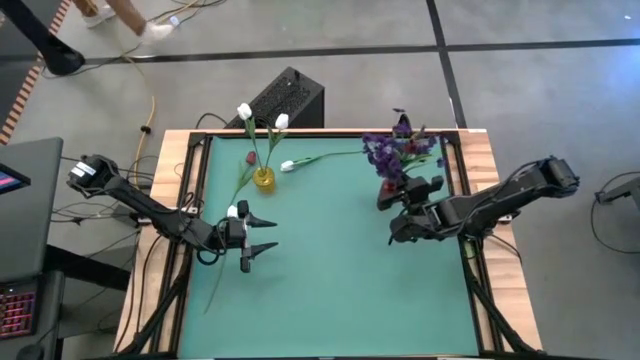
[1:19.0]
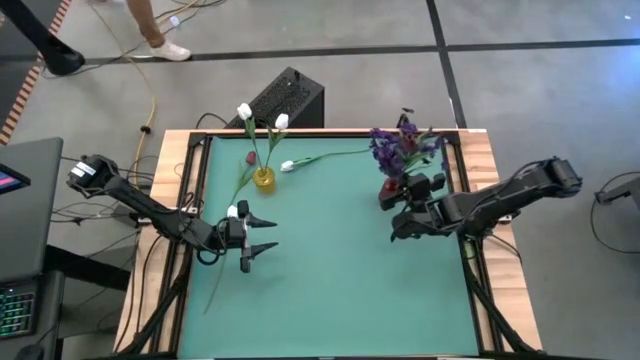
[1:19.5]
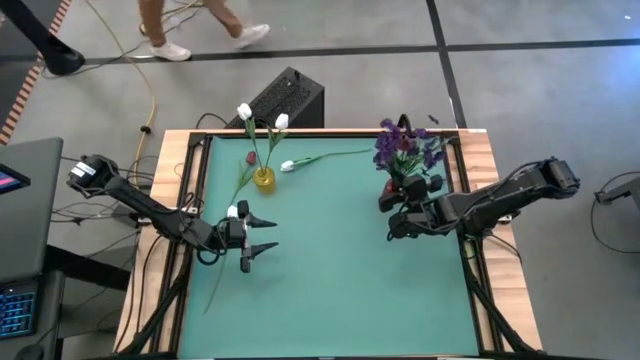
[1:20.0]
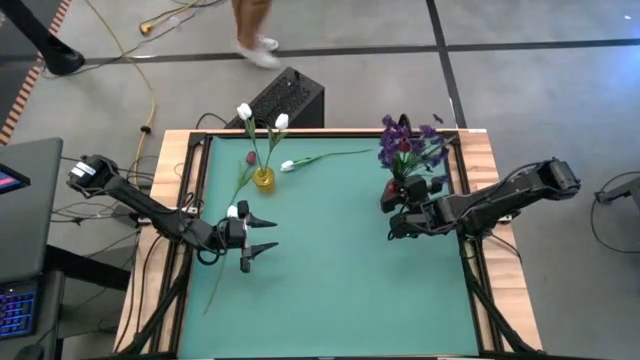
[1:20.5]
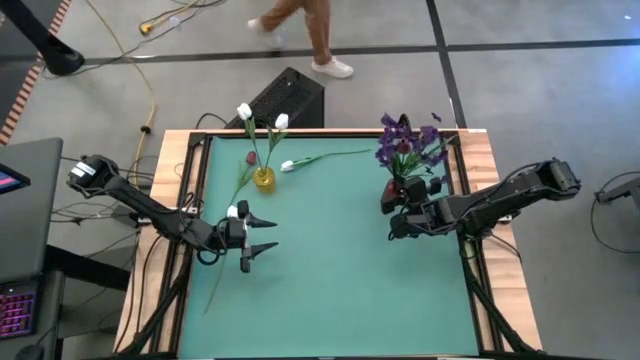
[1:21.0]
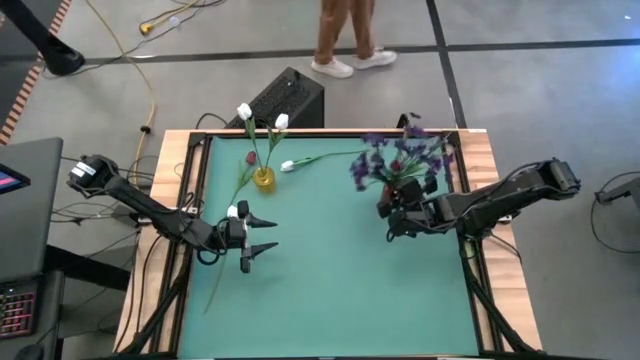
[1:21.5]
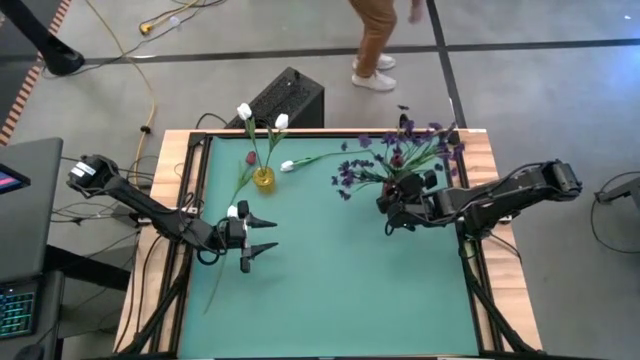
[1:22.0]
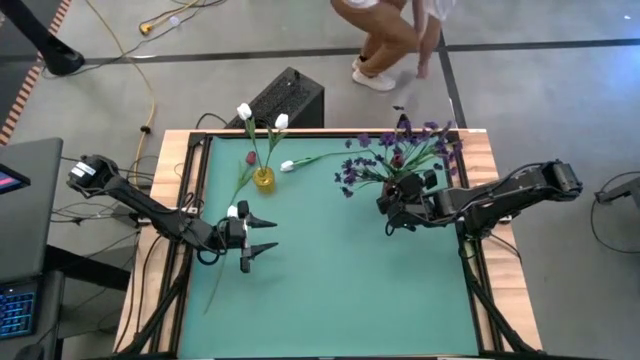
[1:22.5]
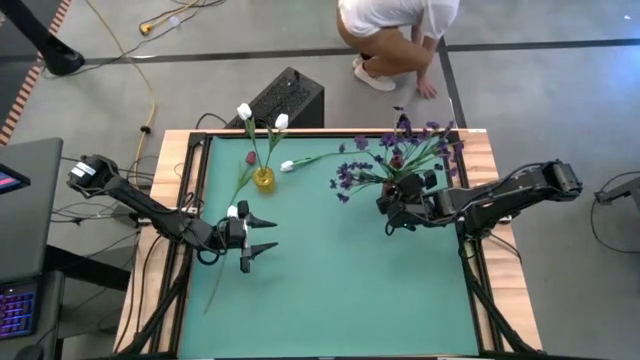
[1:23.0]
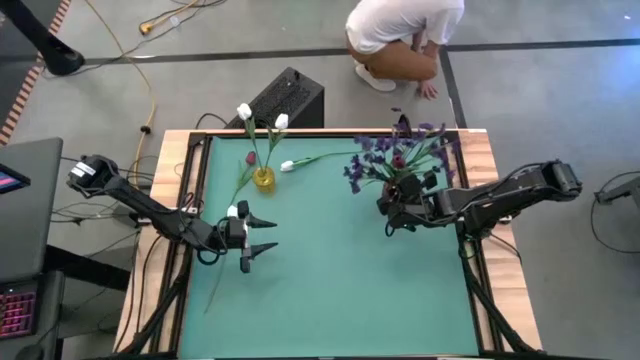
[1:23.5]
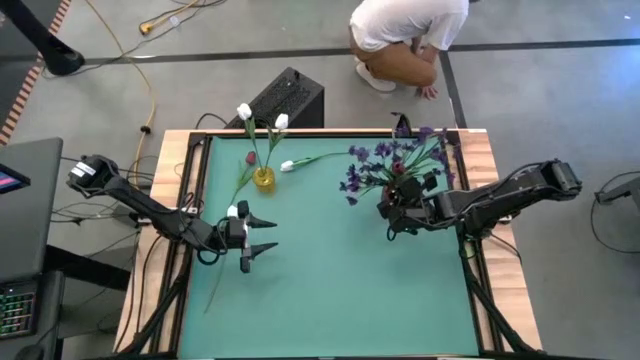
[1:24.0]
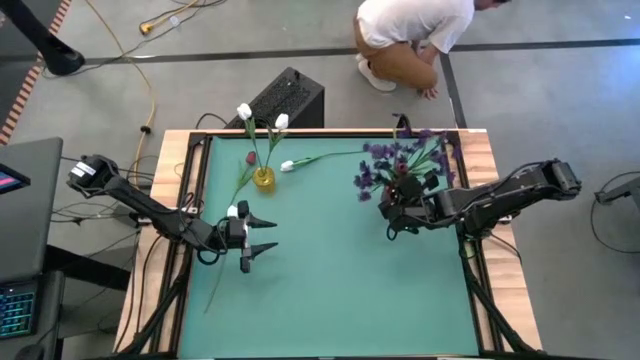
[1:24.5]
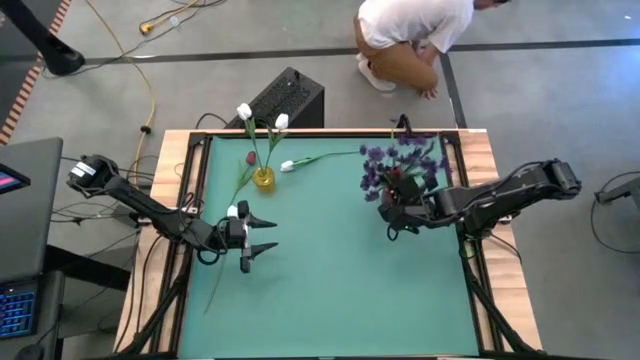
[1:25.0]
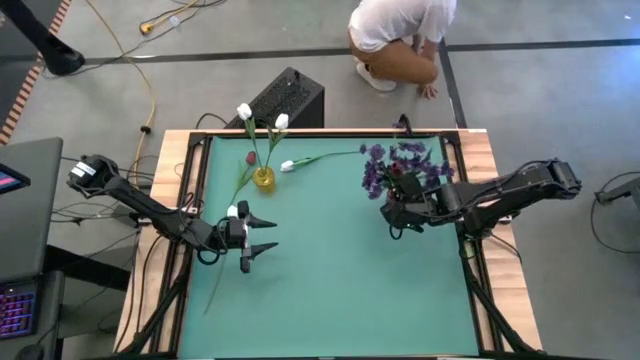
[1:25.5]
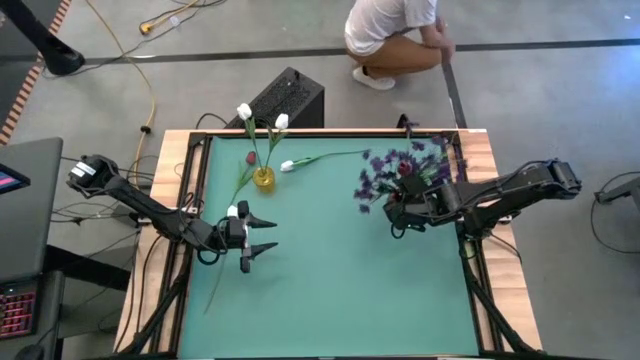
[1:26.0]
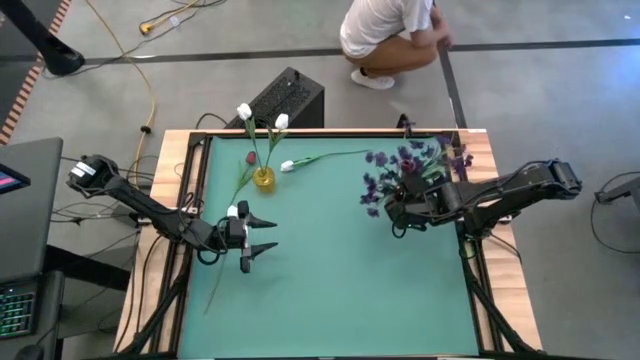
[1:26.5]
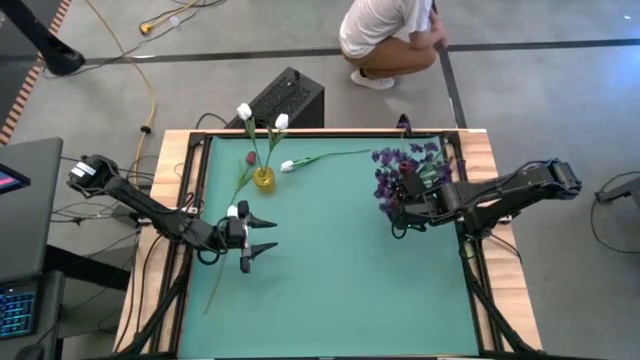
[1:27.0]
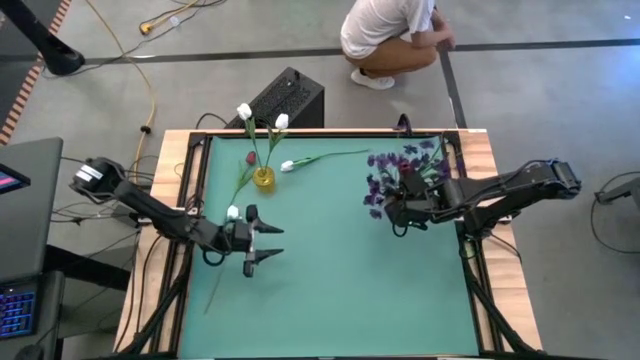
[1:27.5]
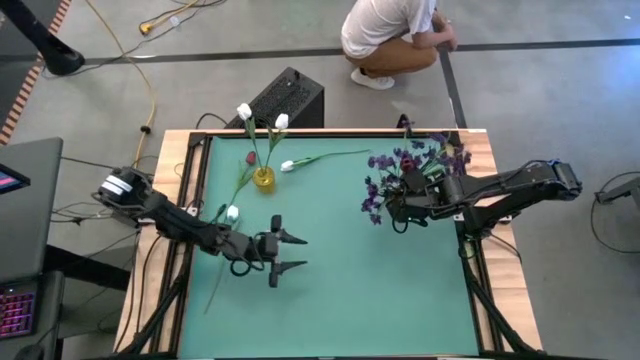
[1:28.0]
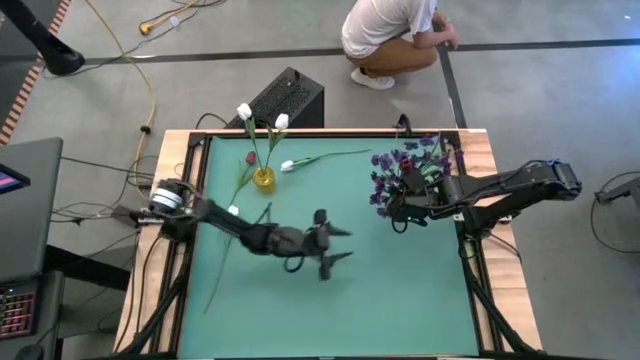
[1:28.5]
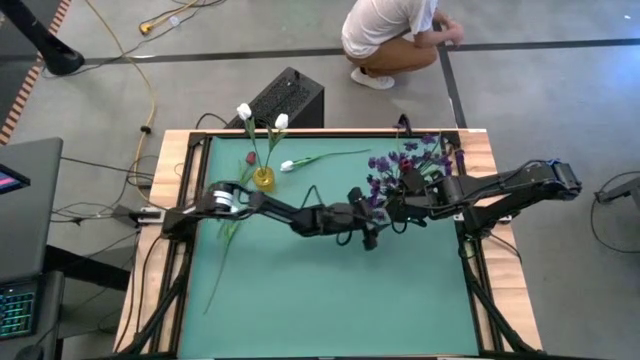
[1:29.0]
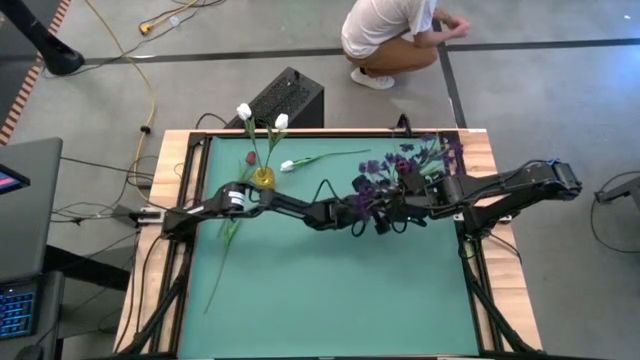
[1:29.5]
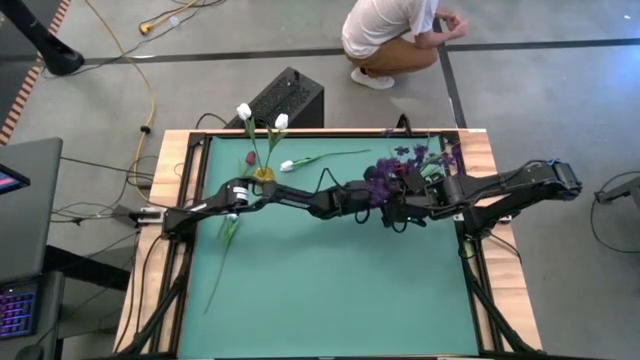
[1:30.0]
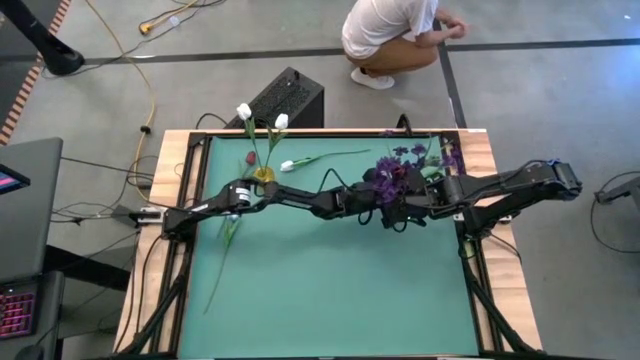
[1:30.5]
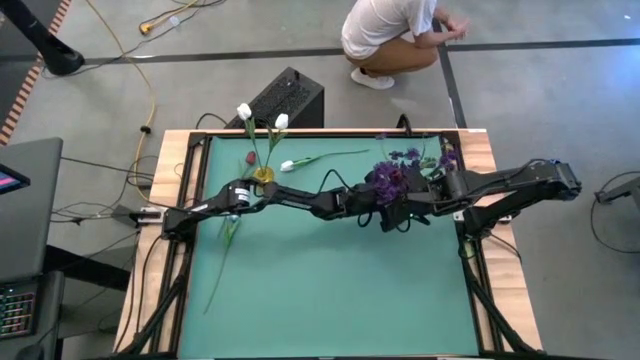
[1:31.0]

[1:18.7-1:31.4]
Task: Sort flowers into vase by color
Put the bottom red flower into the red vase

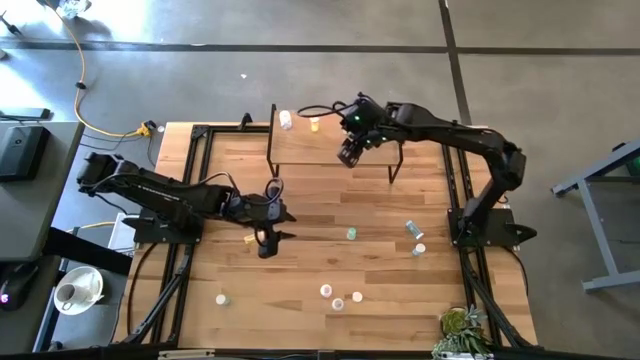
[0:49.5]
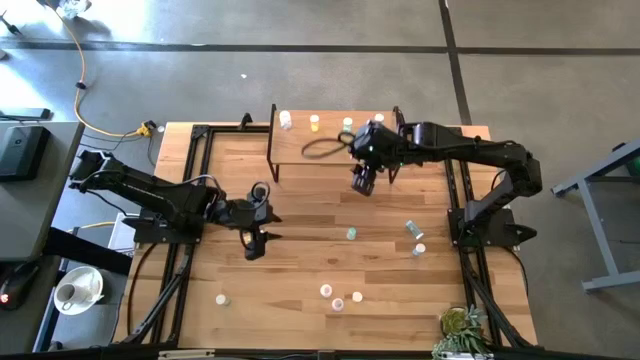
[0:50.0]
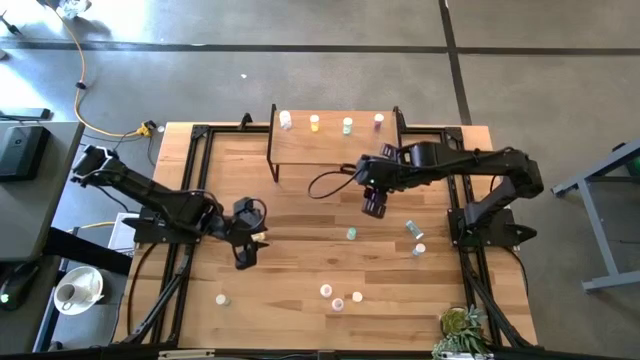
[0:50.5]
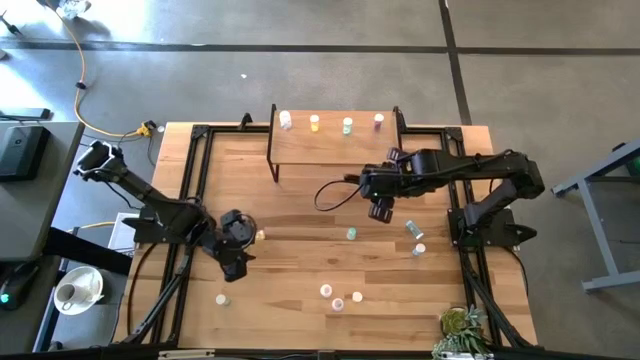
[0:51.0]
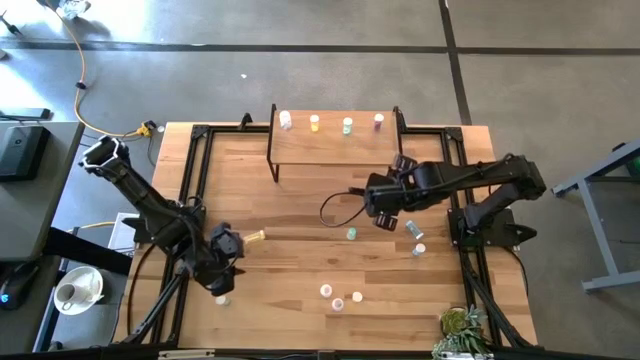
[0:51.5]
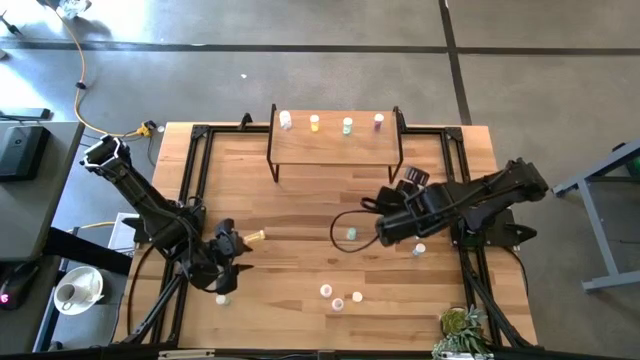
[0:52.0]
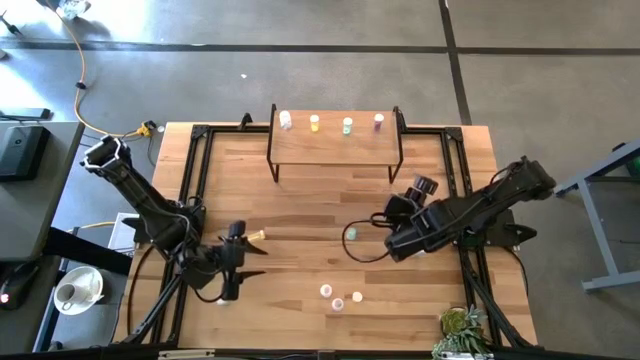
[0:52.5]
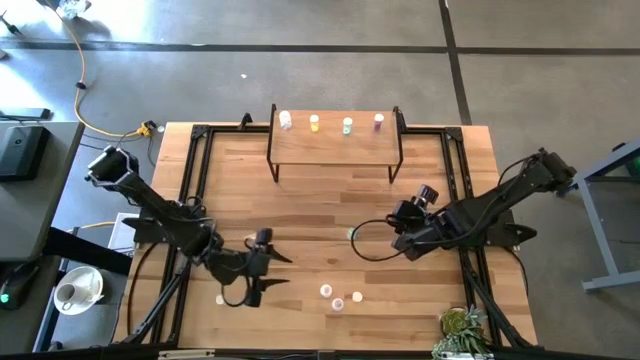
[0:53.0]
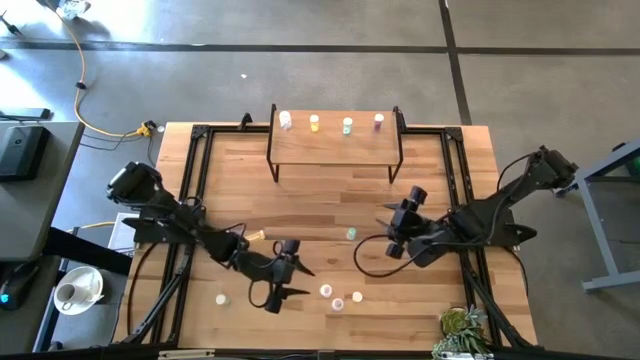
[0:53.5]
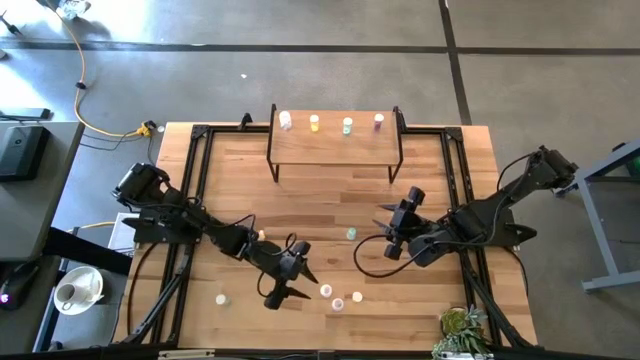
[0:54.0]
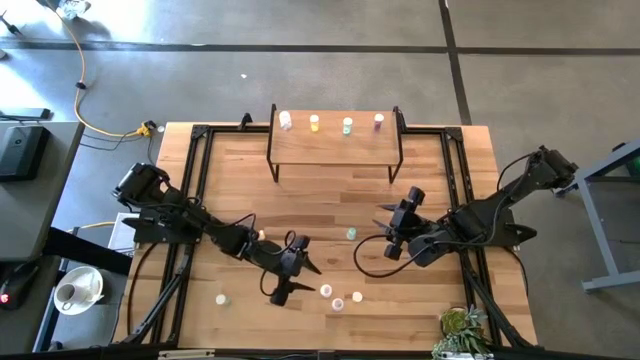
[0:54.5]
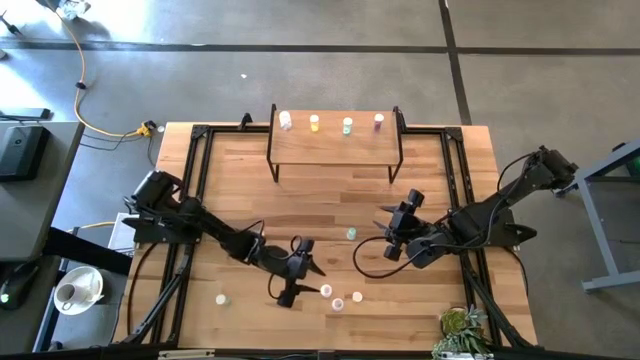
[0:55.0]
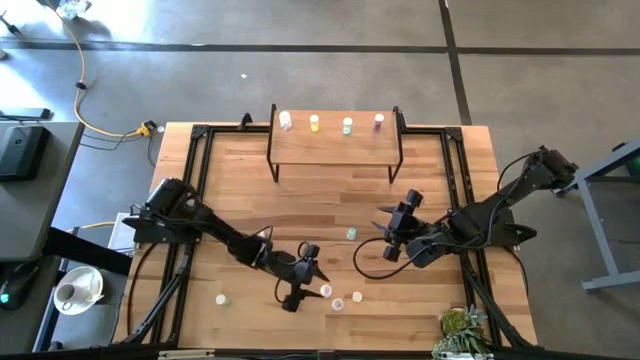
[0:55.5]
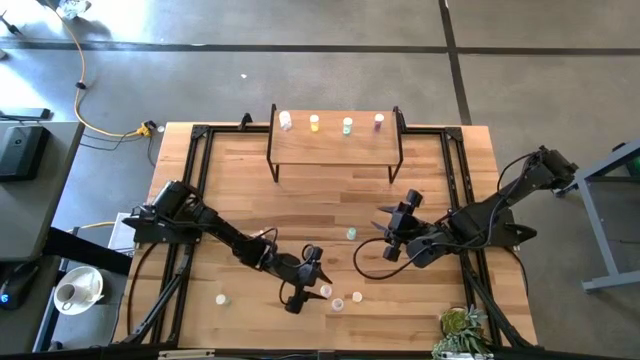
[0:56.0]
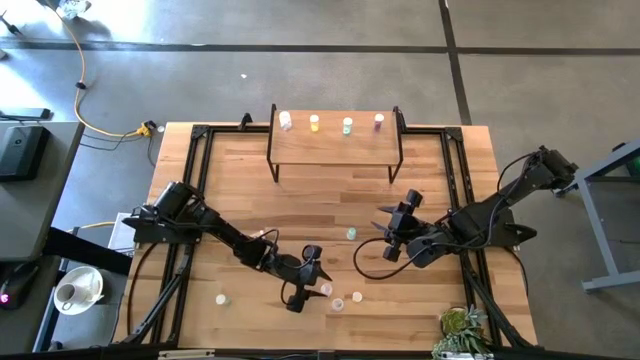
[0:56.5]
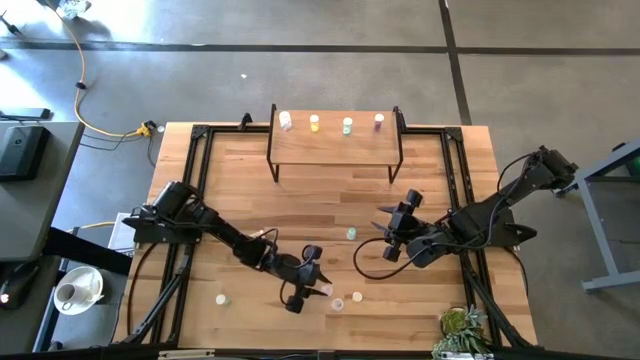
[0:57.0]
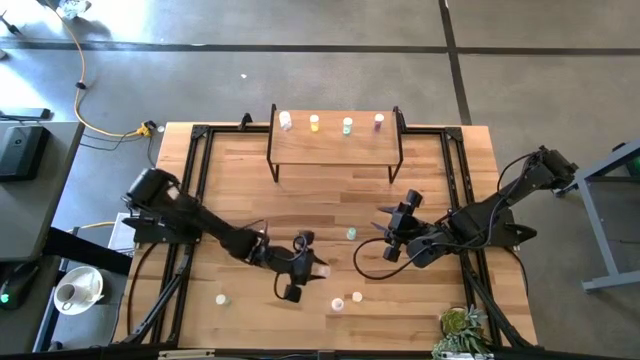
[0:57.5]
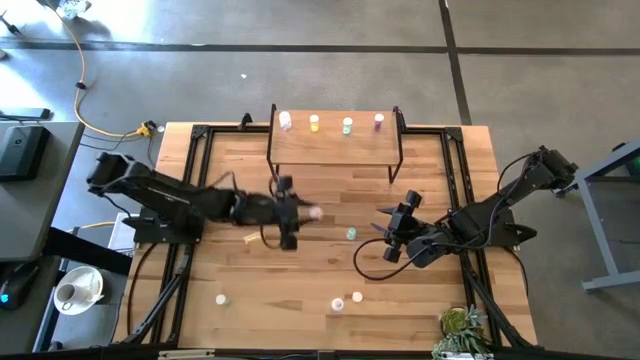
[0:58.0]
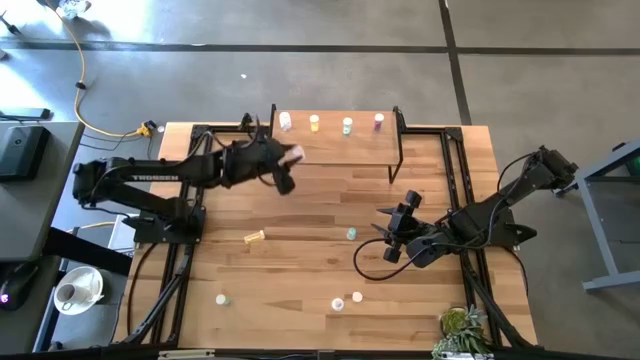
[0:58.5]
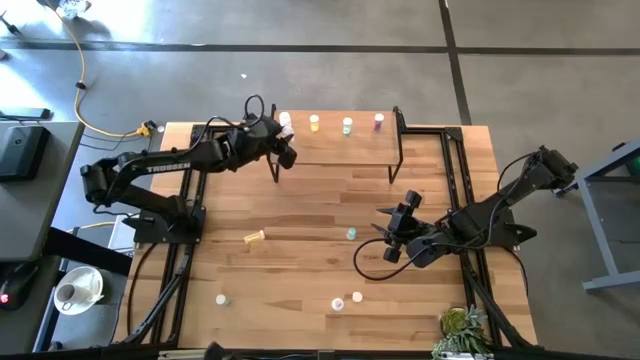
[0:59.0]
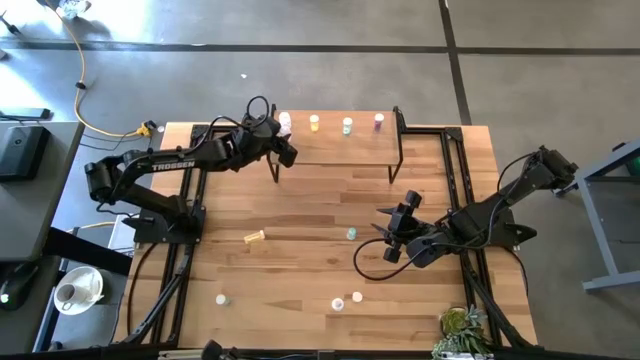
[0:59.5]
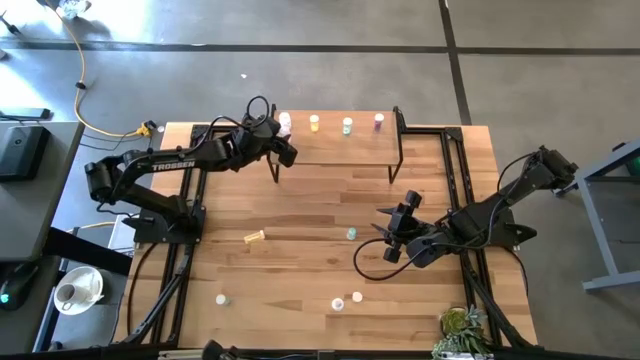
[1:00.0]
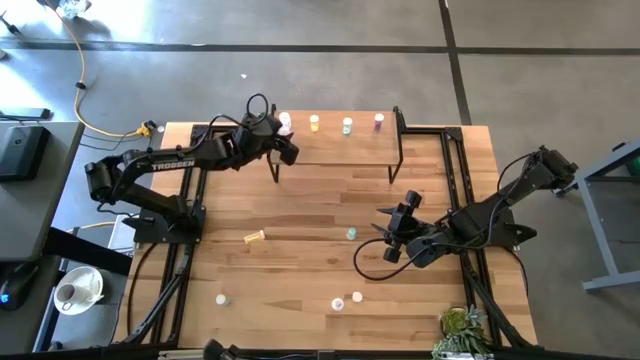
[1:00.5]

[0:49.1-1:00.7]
Task: Pick and place medicine bottles onto shelf by color
Put the top white pill bottle on the shelf aligned with the other white pill bottle
